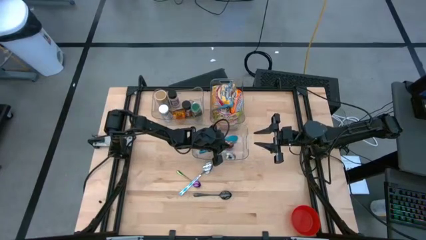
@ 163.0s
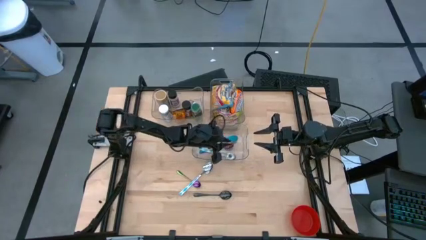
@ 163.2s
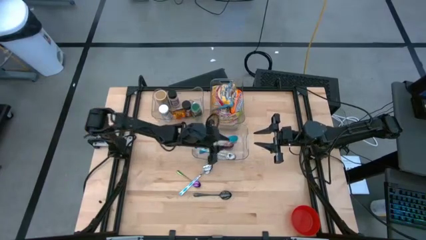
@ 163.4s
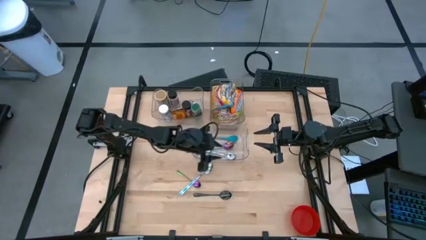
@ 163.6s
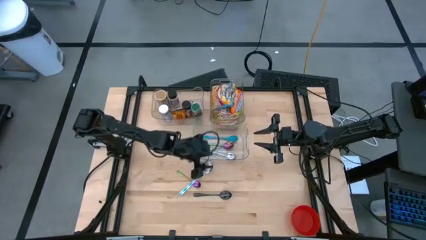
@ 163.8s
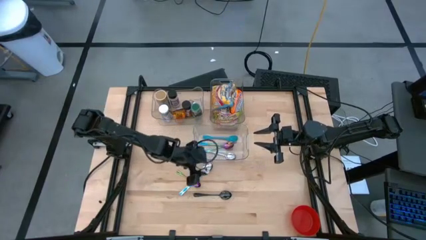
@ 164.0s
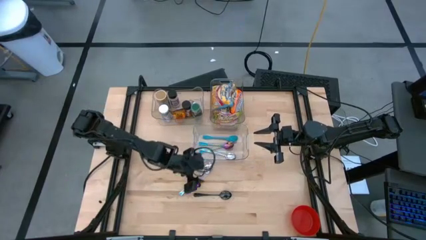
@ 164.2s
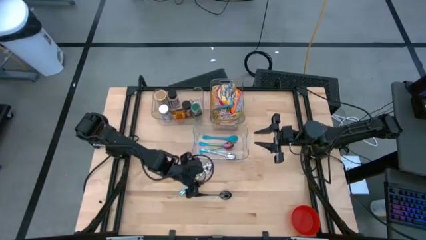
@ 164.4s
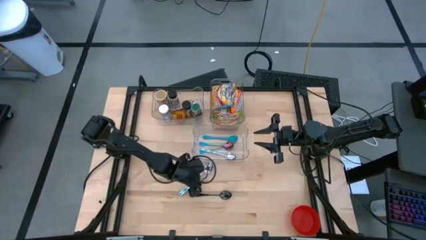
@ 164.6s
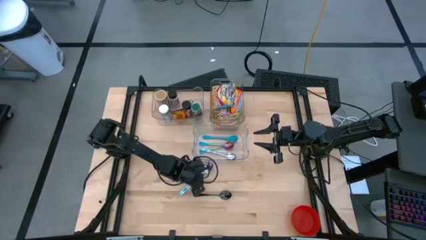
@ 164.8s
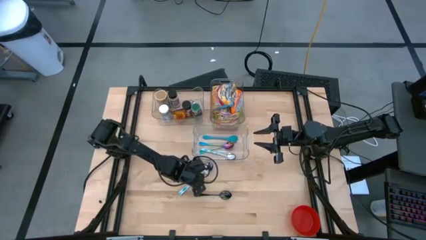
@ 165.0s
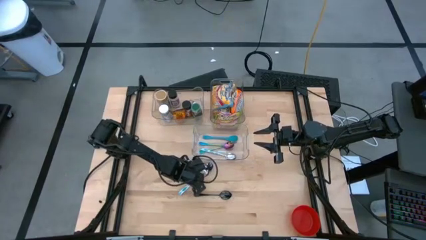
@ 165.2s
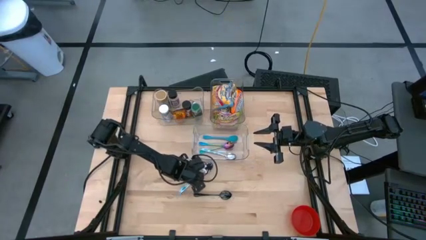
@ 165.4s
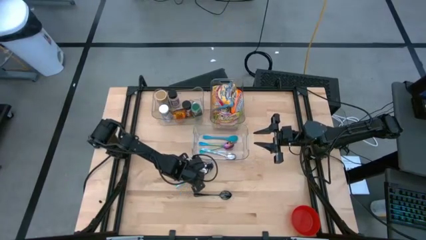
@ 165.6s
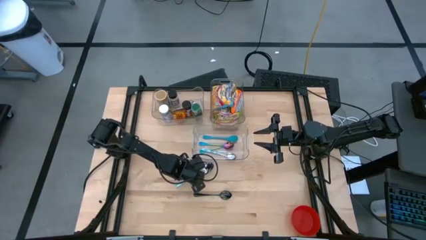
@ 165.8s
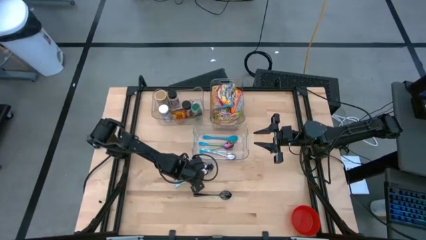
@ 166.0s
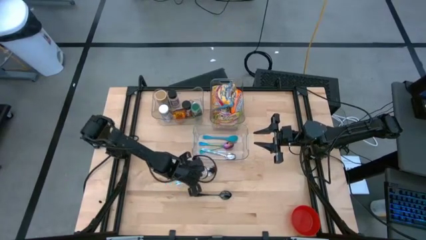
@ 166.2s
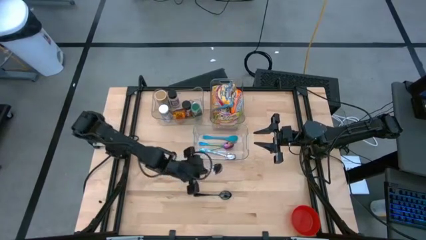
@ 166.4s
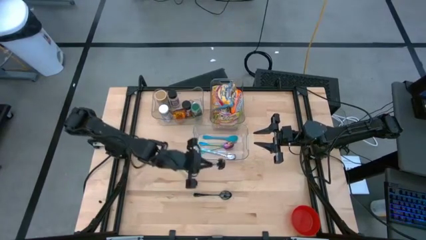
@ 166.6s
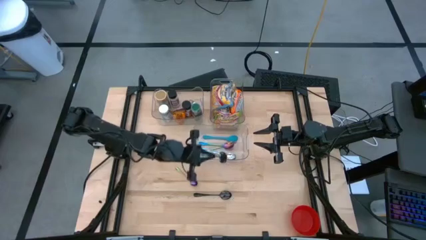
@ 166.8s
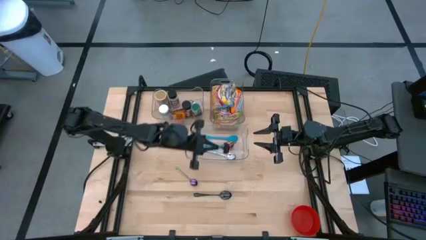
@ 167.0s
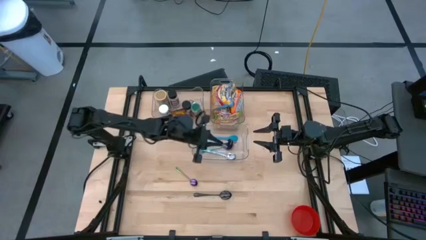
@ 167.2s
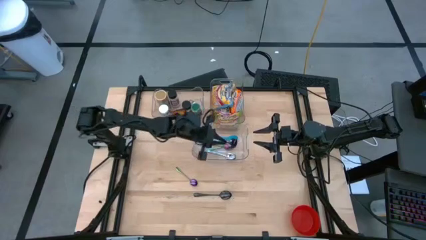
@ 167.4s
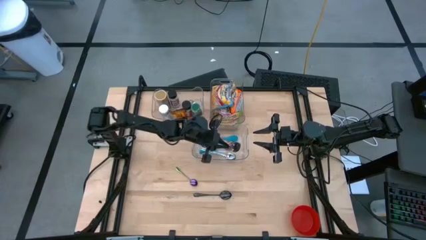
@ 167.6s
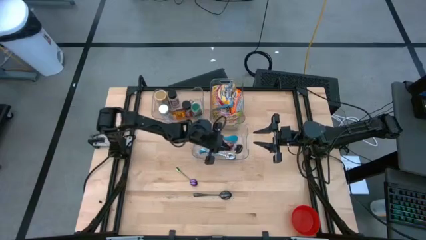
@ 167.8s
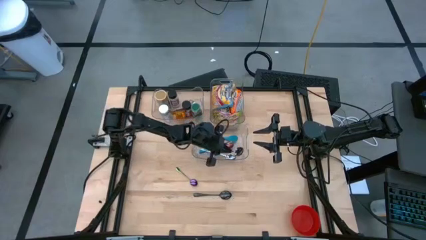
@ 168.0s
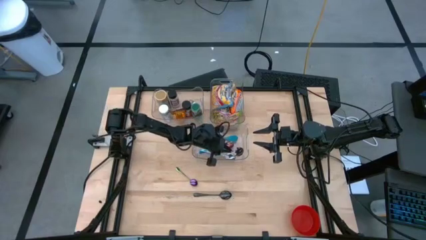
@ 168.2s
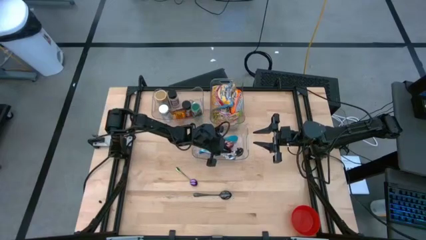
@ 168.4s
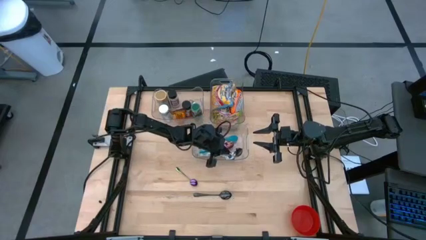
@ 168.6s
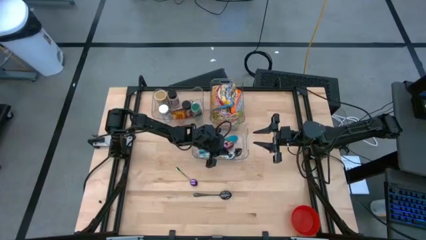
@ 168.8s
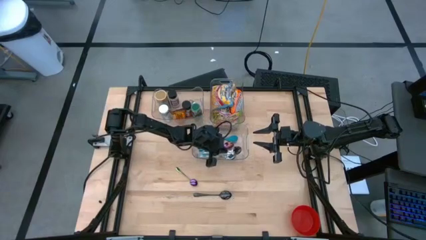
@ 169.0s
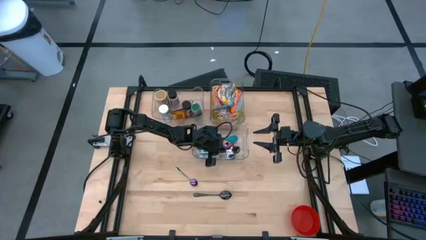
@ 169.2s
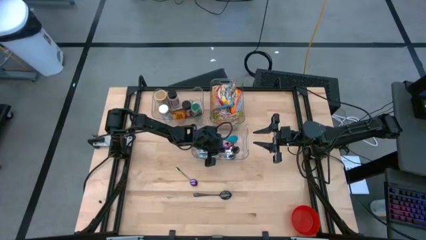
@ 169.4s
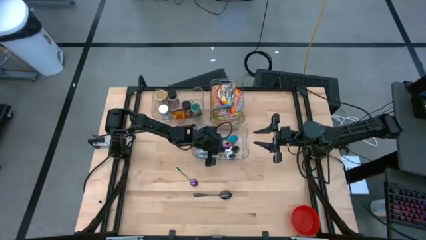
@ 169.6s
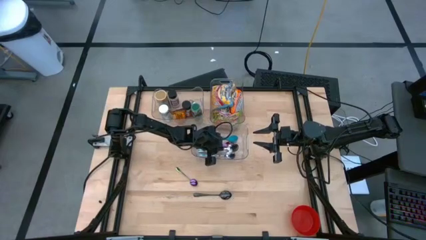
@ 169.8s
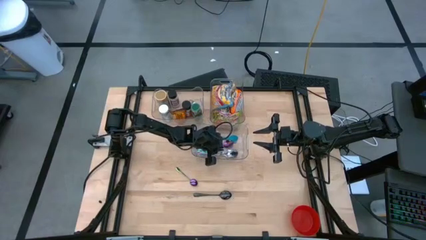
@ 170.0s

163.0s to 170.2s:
Task: Pick & Place Food Item
Put the green patterned spoon into the transparent container

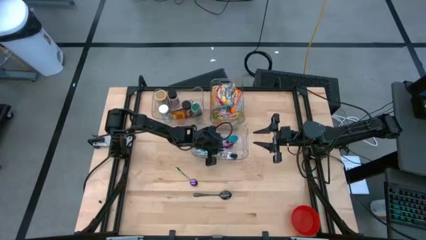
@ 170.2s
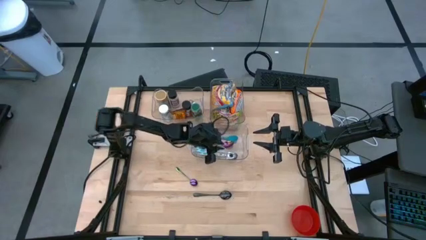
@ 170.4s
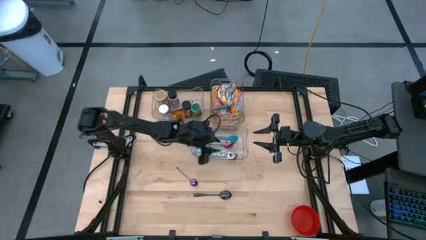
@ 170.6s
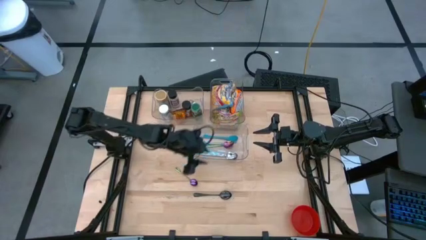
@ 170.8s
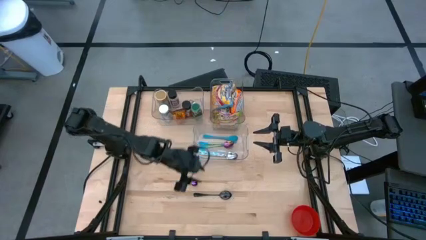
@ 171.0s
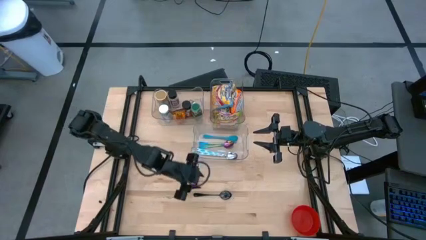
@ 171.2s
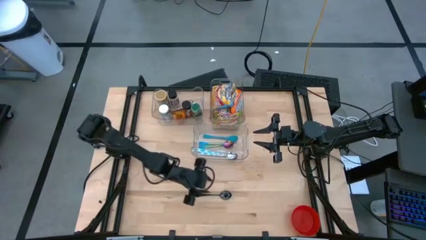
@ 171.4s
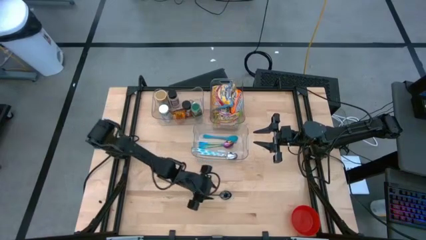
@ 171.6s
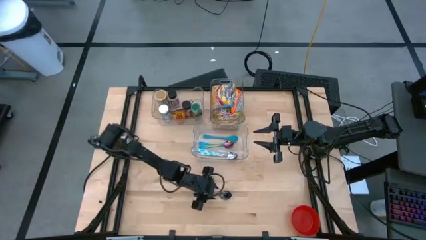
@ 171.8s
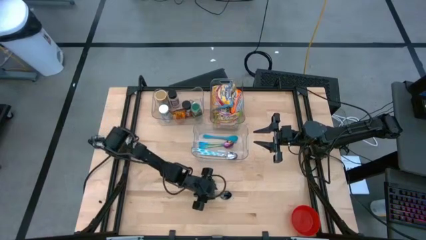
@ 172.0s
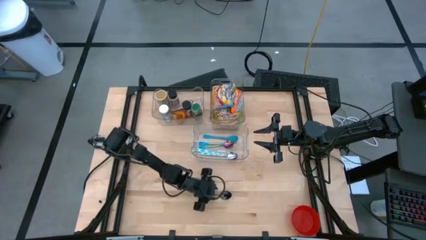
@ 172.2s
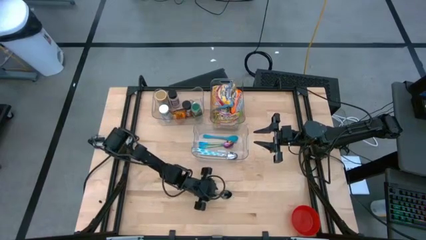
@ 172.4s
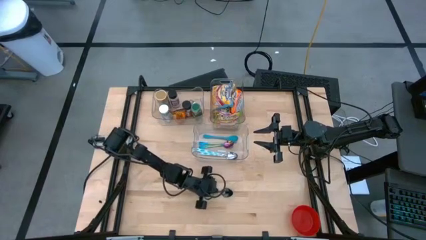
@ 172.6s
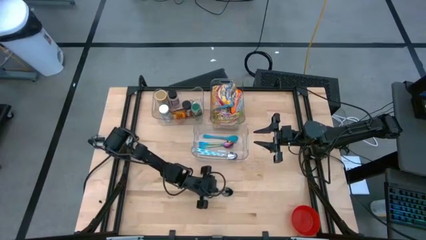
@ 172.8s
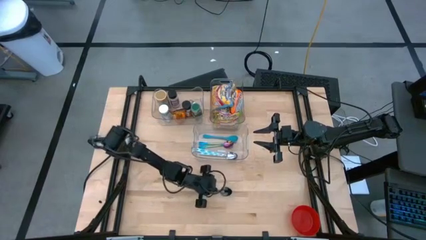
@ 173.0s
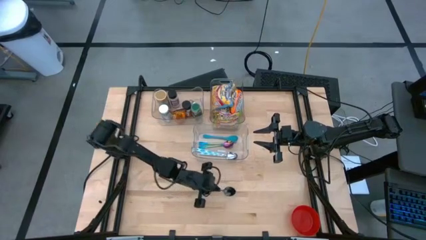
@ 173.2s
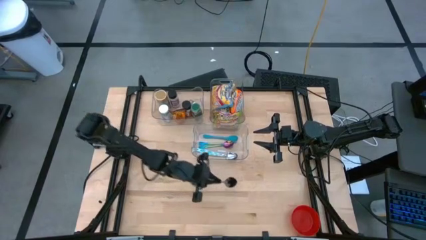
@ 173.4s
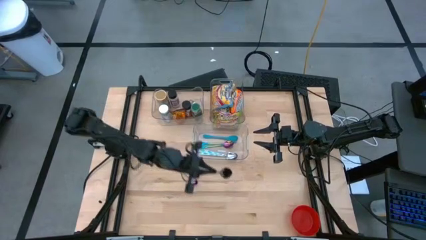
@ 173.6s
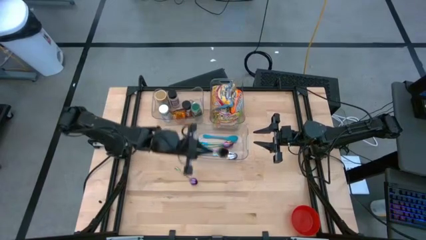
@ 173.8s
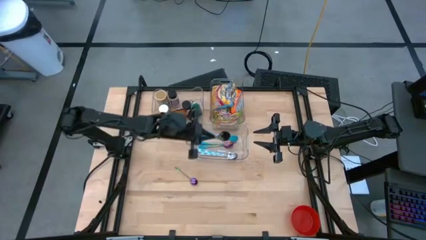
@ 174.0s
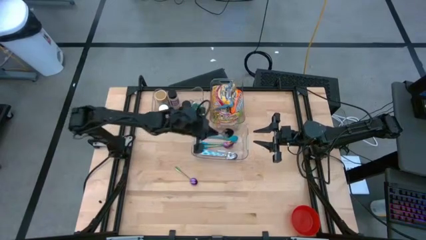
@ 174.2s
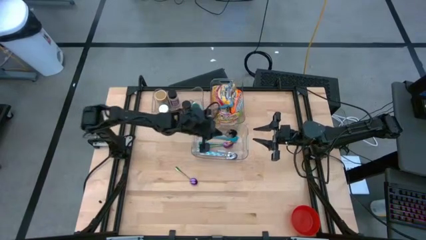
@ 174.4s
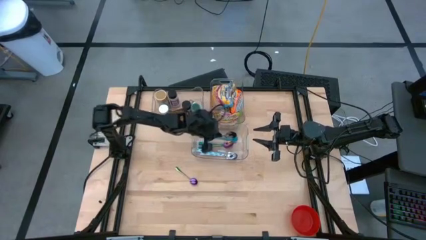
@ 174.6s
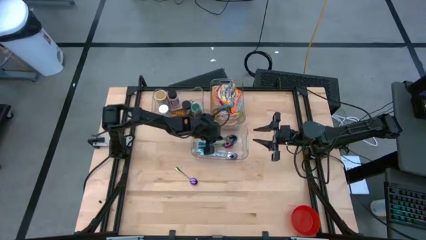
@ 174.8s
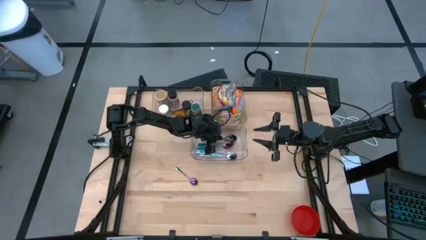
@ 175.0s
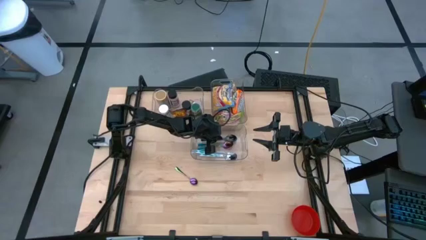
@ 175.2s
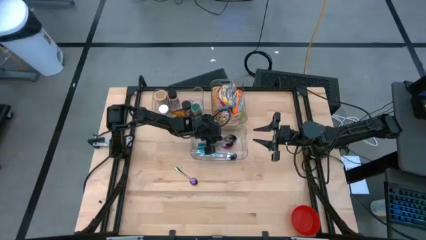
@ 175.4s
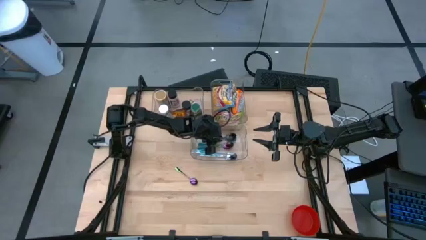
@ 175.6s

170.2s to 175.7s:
Put the black spoon into the bottom transparent container

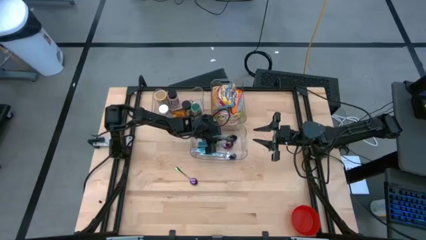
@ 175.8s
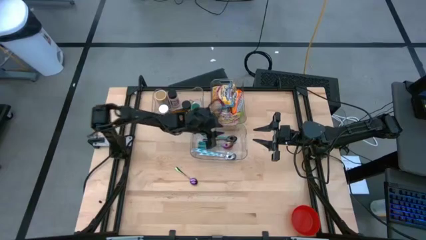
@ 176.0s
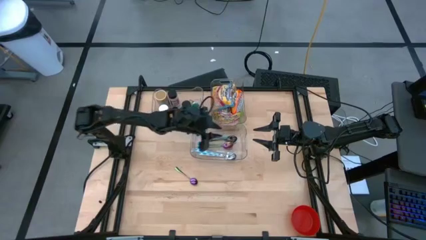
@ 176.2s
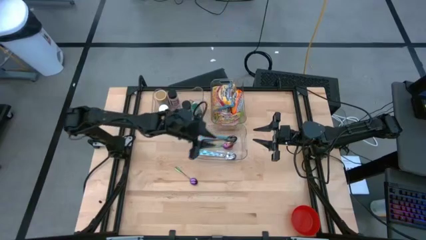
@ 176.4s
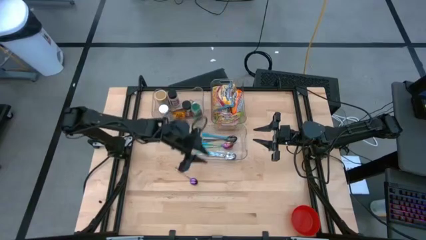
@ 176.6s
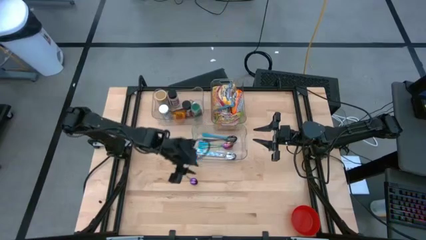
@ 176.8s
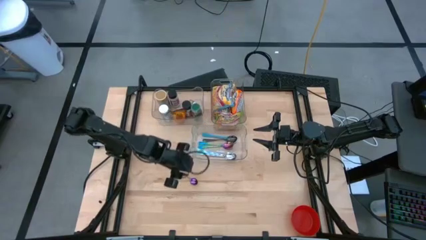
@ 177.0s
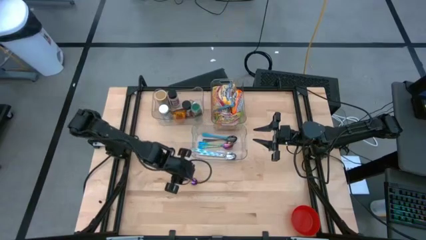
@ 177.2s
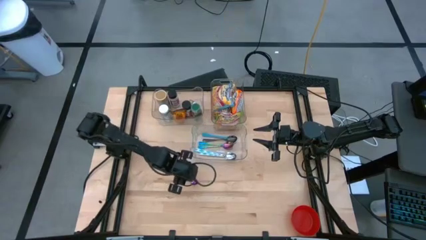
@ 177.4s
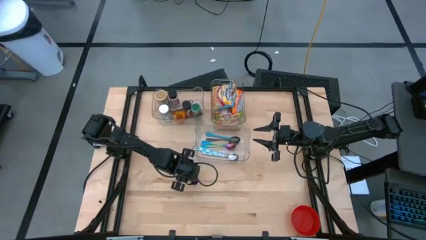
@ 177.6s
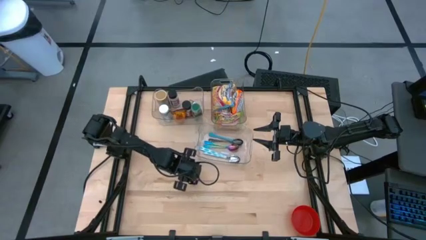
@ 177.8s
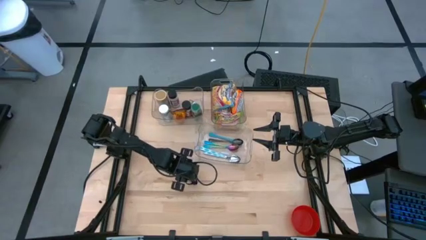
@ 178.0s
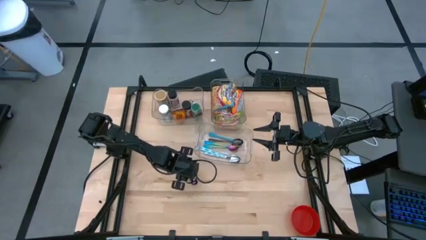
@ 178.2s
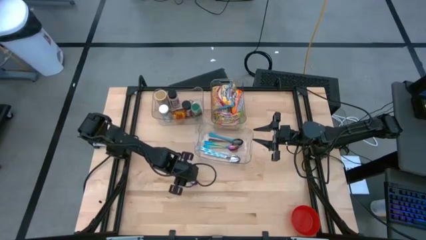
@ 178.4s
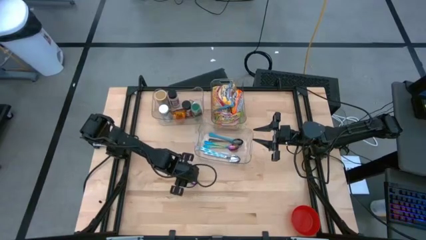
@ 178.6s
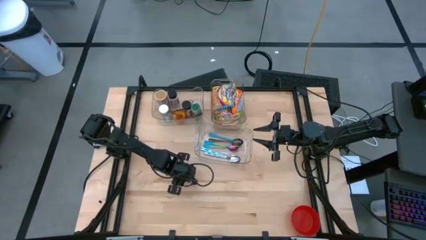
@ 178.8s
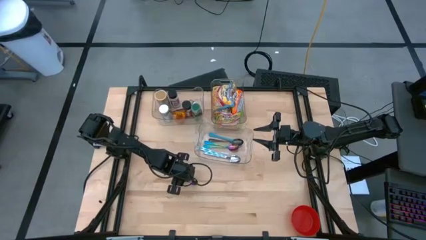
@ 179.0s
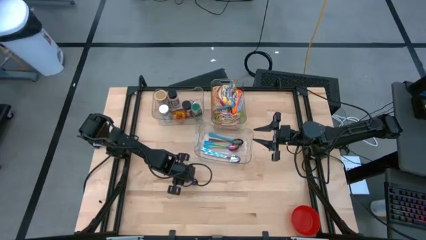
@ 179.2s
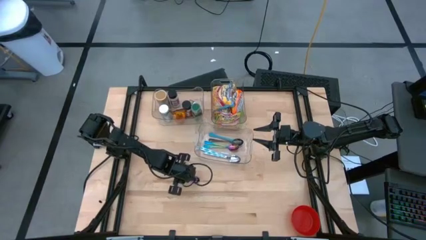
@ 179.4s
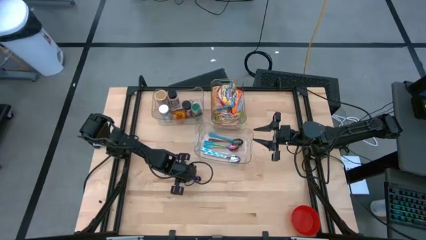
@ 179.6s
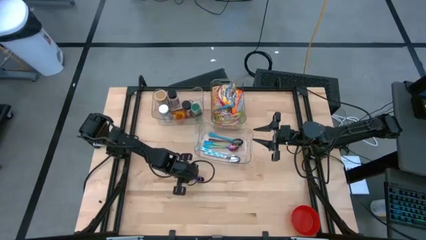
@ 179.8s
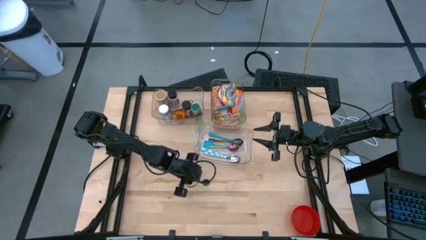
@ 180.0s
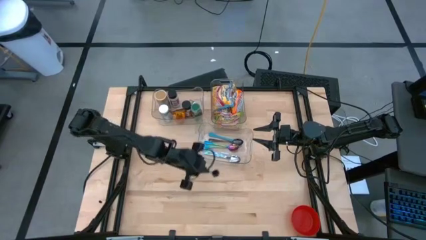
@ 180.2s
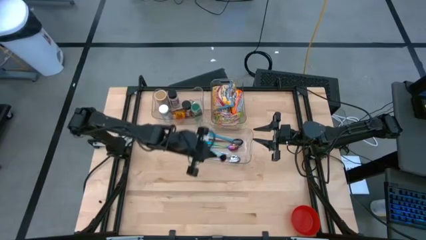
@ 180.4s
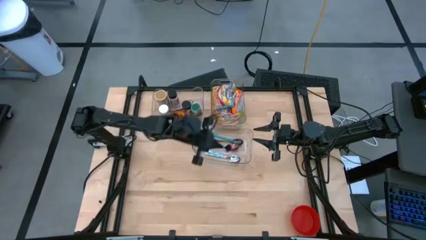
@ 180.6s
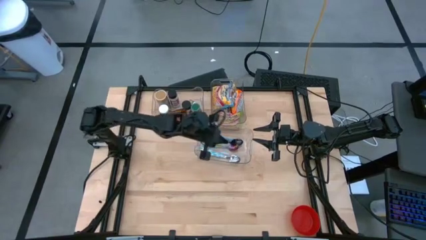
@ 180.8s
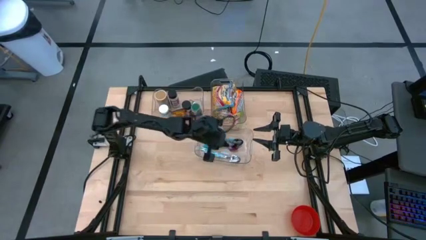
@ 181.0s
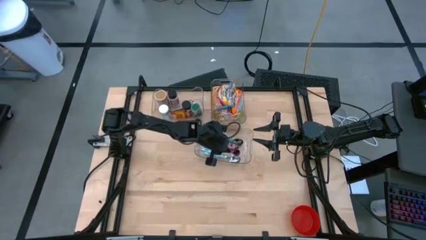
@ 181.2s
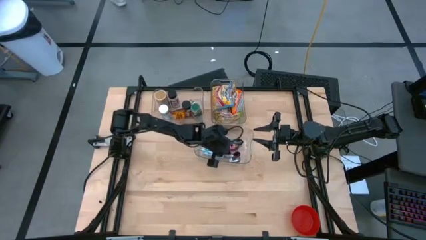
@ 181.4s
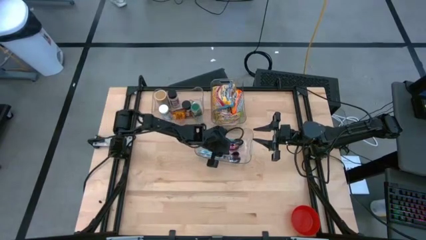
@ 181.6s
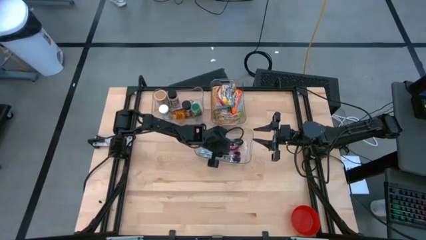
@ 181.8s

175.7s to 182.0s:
Put the purple spoon into the bottom transparent container
